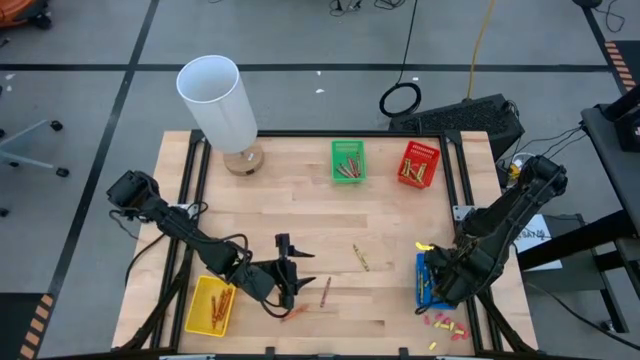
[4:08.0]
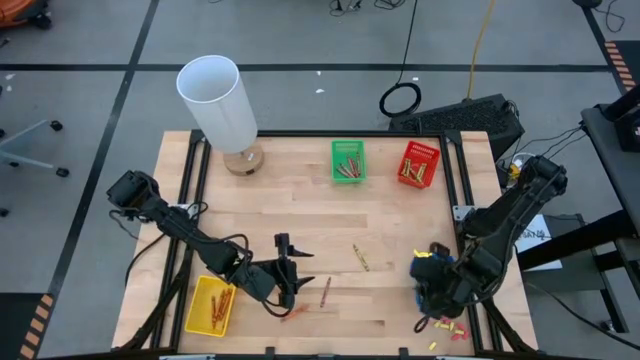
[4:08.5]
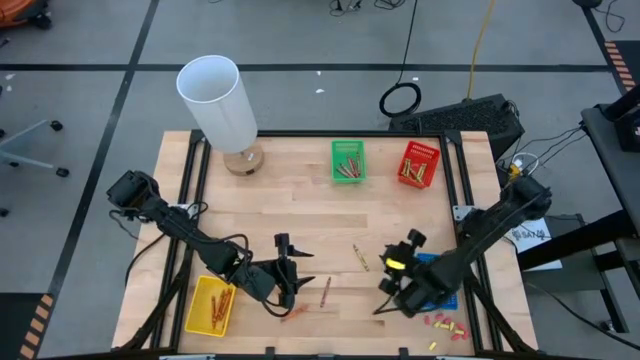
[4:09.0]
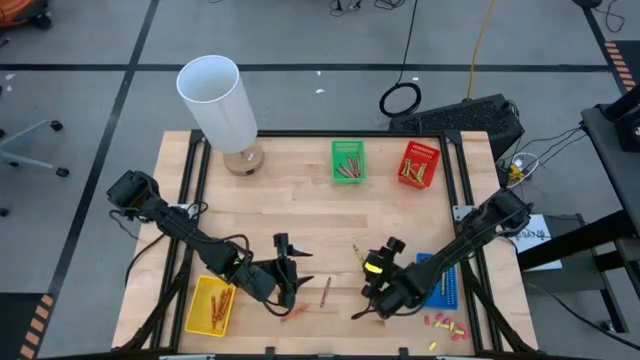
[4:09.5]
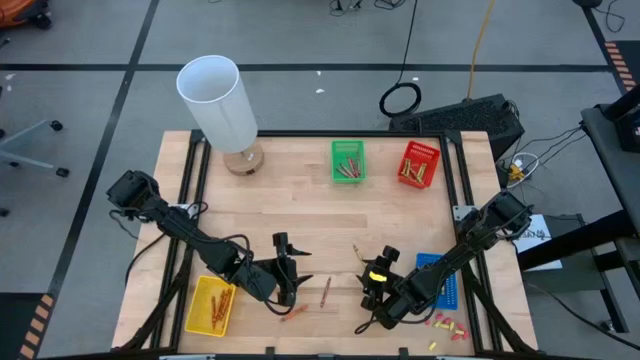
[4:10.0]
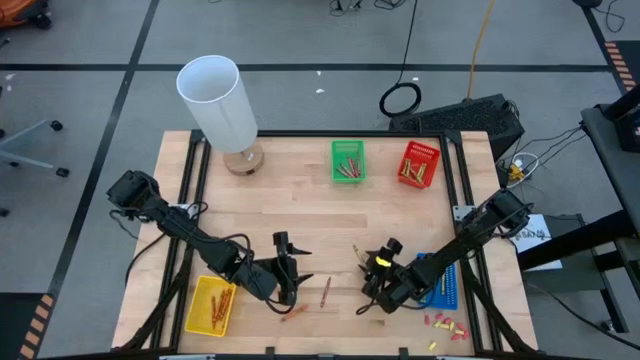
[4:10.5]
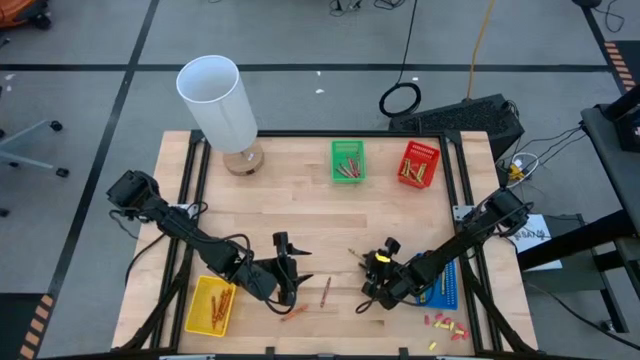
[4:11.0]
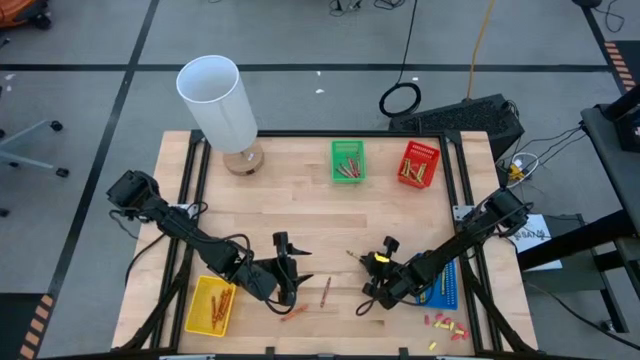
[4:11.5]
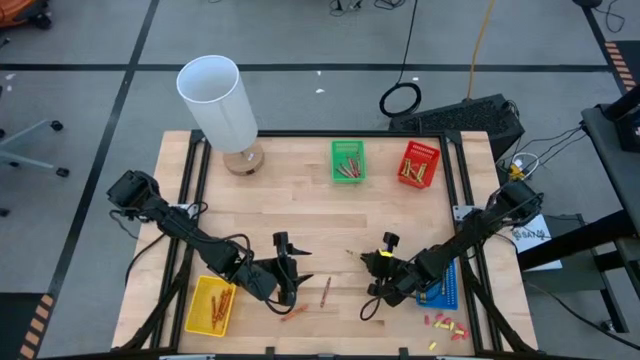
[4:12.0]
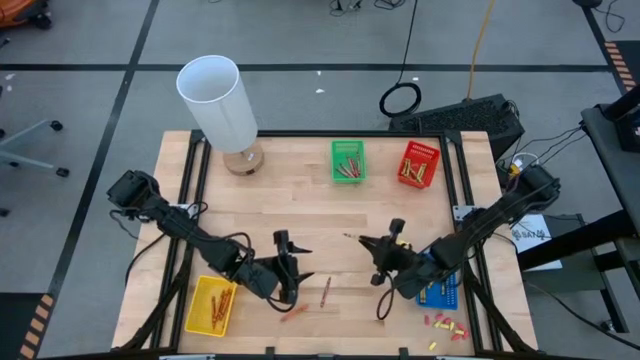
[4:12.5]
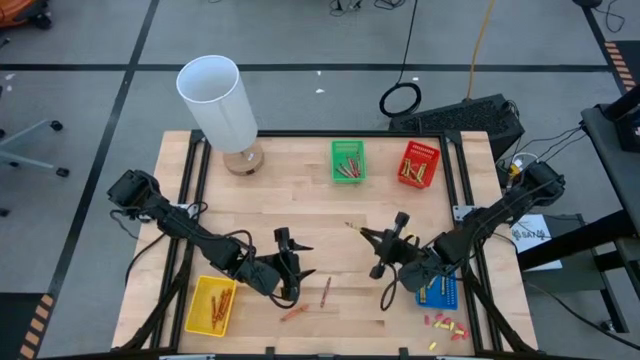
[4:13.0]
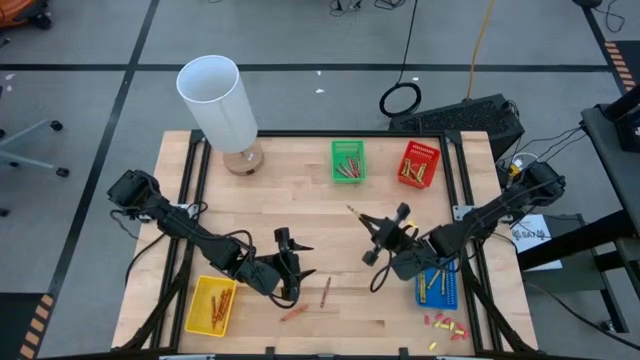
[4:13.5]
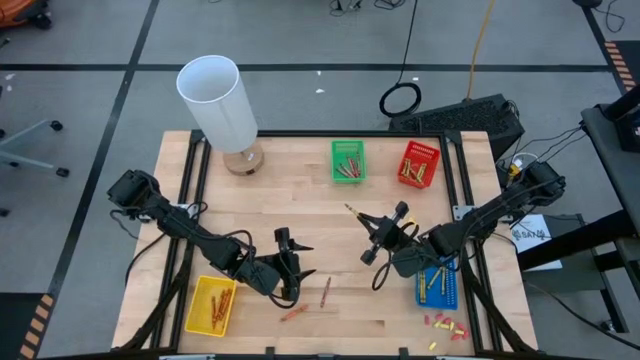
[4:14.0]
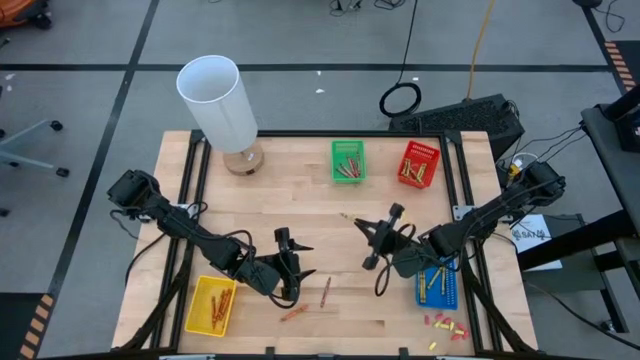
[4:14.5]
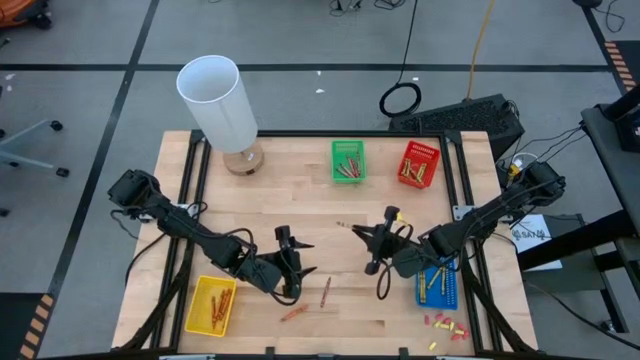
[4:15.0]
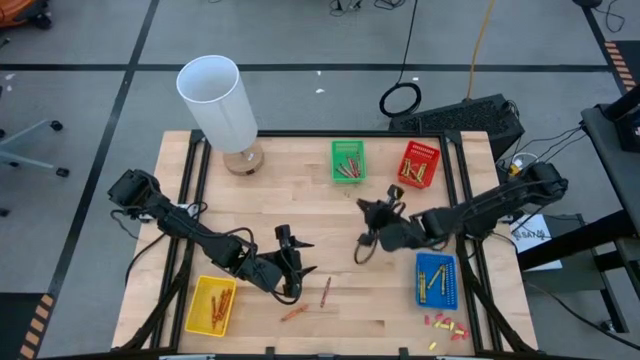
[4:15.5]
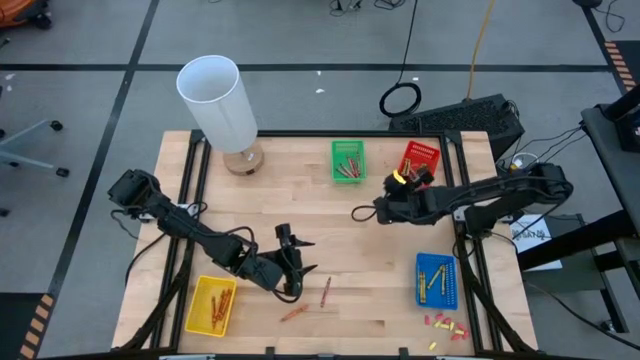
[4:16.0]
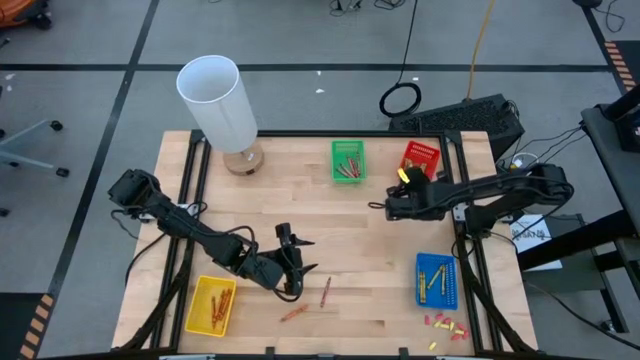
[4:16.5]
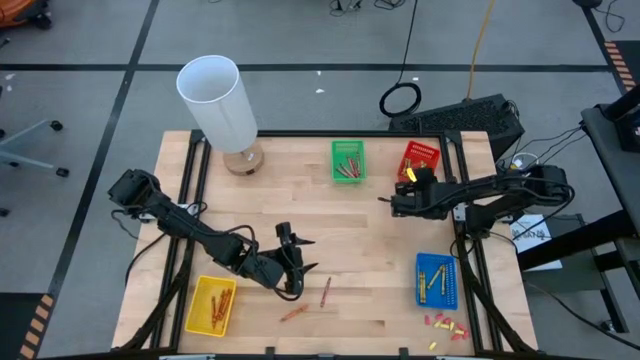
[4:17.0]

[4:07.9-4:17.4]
Task: Sort crayons
Put the green crayon into the red bin

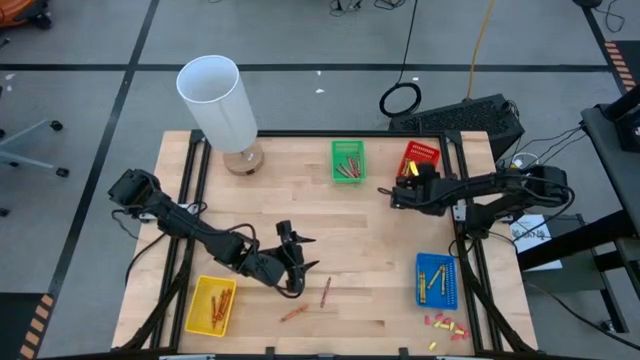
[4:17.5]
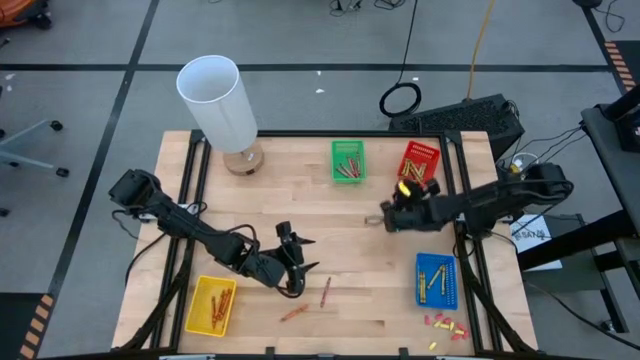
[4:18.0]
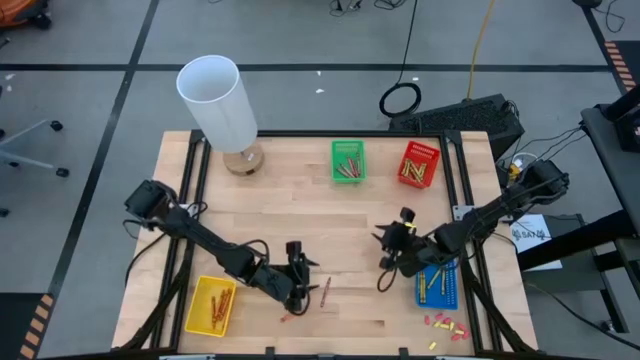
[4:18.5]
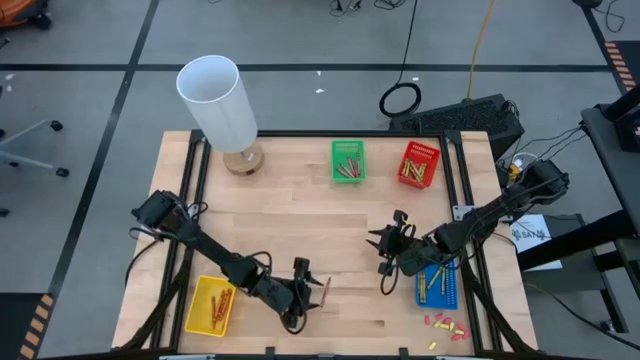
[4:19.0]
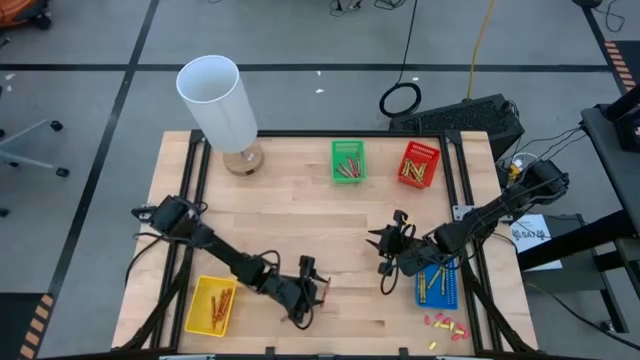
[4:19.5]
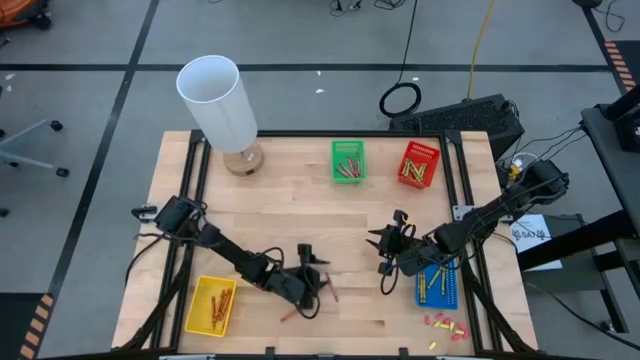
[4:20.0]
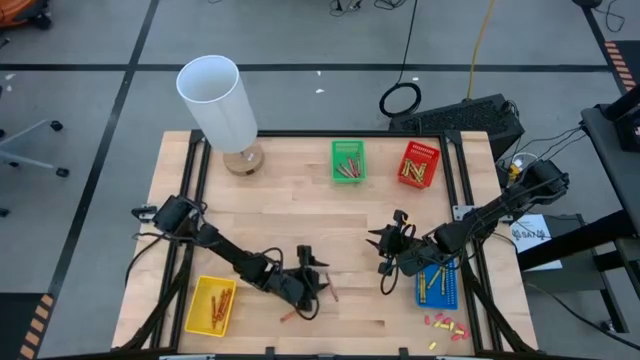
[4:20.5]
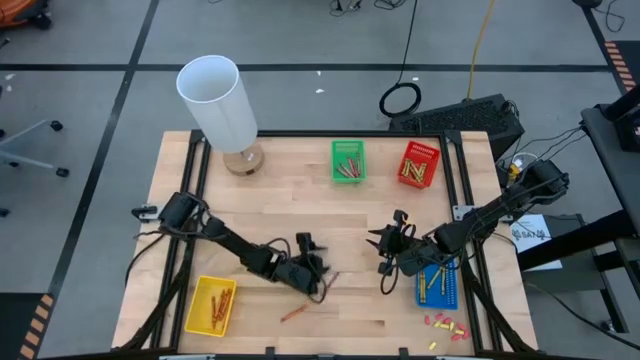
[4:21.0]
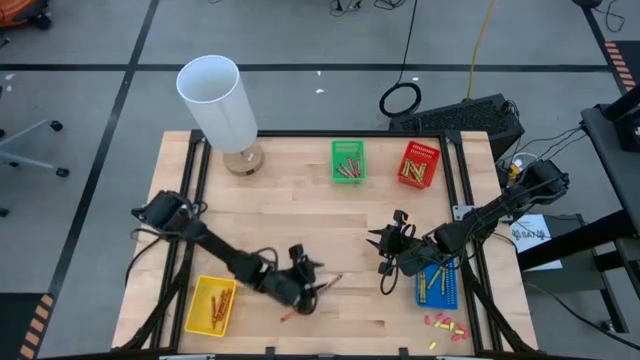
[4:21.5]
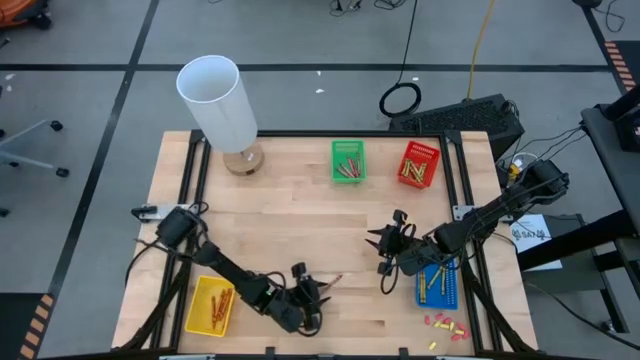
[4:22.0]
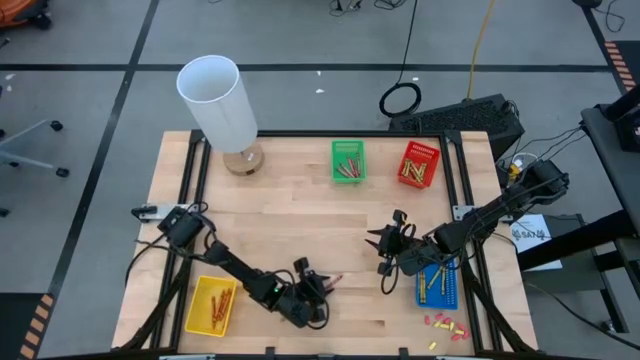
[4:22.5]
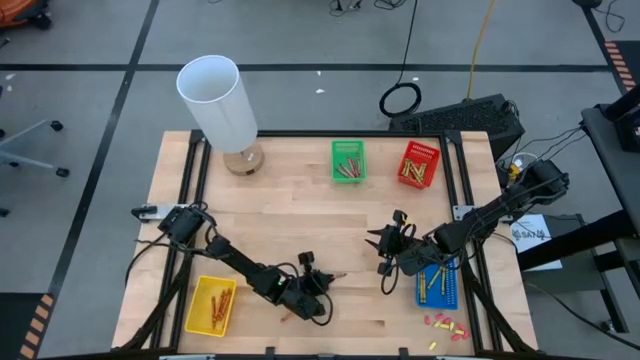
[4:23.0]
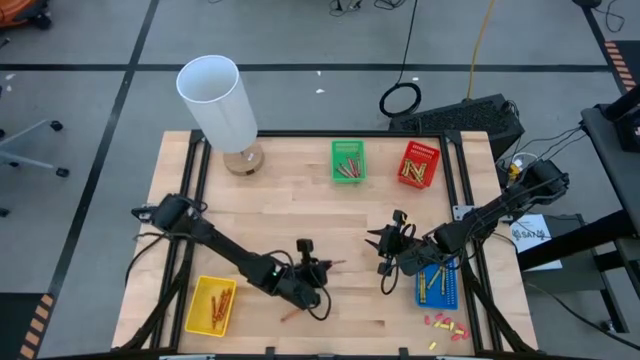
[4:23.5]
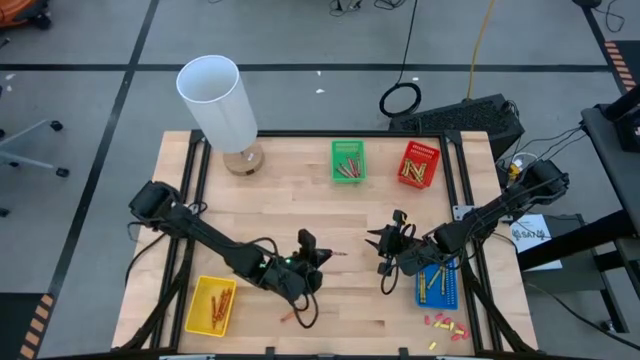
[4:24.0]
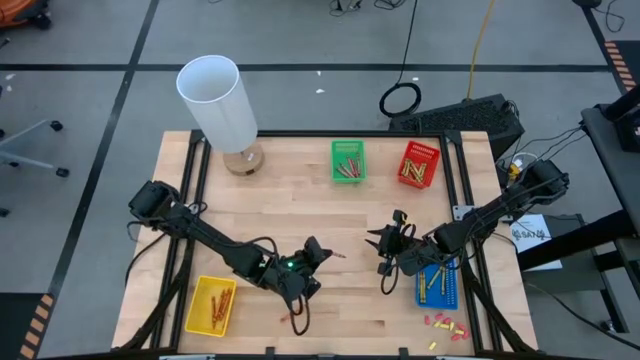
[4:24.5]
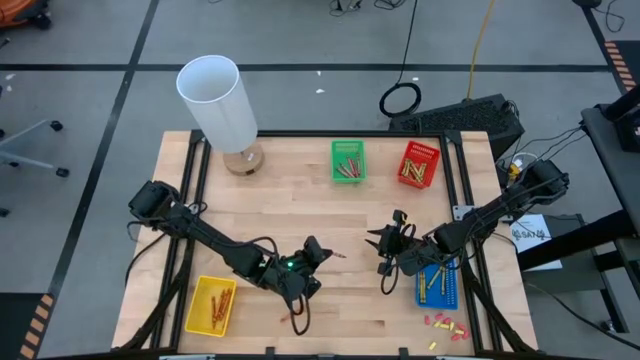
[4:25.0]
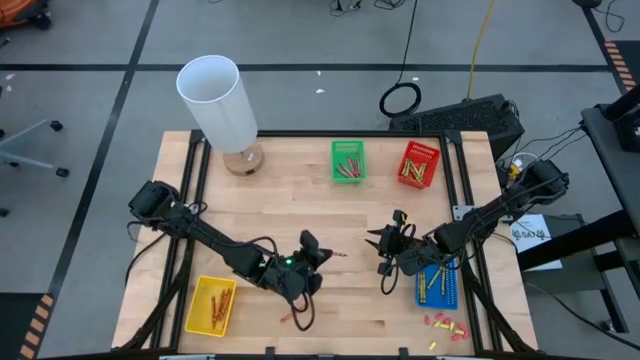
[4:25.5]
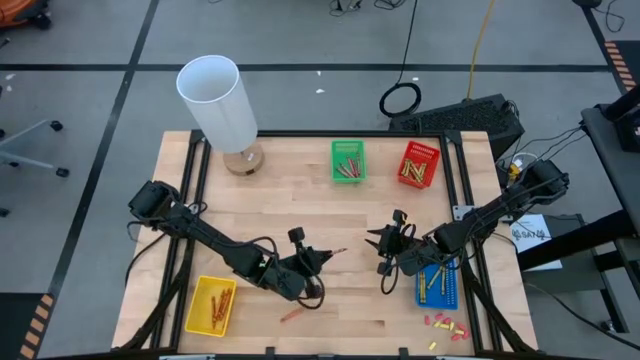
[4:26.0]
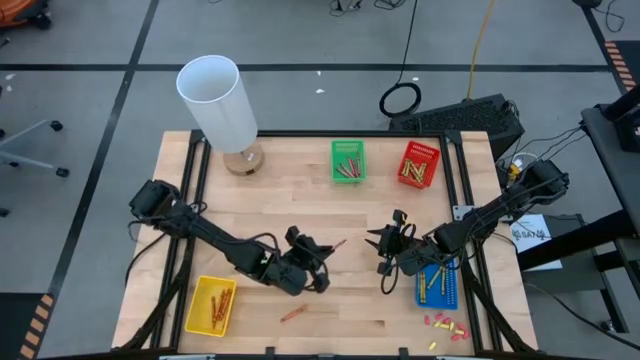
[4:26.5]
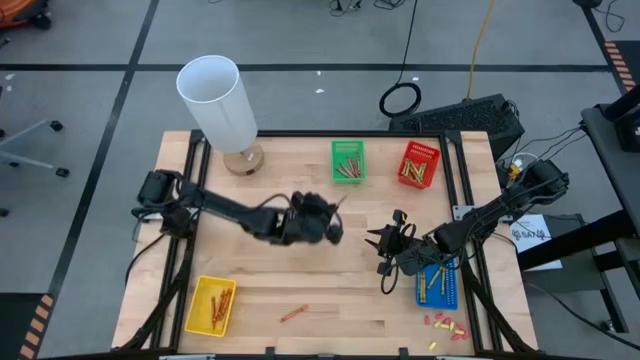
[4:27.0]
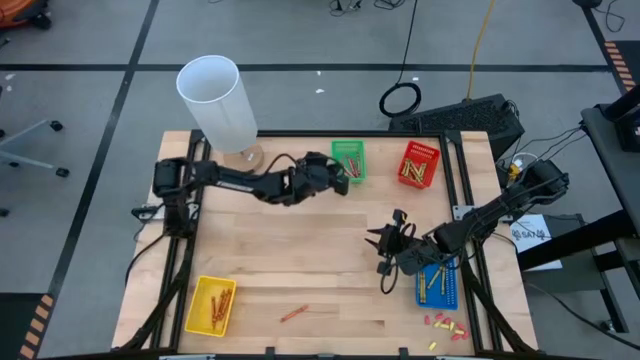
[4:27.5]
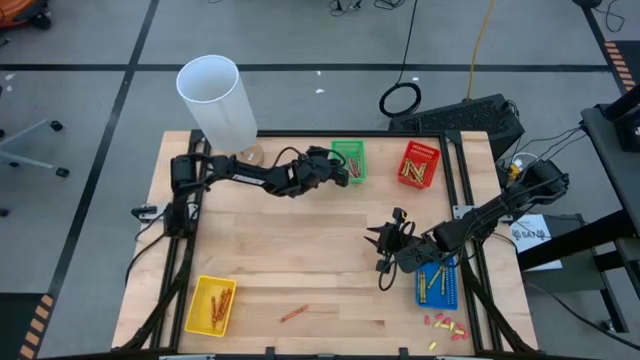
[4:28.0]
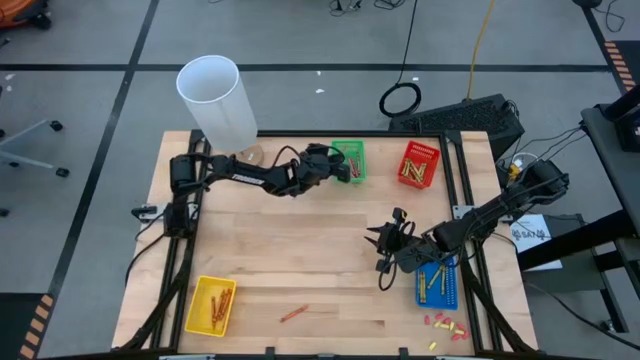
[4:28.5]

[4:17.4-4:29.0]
Put the red crayon into the green bin
